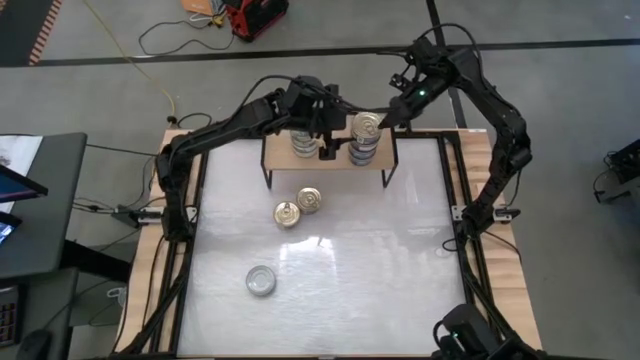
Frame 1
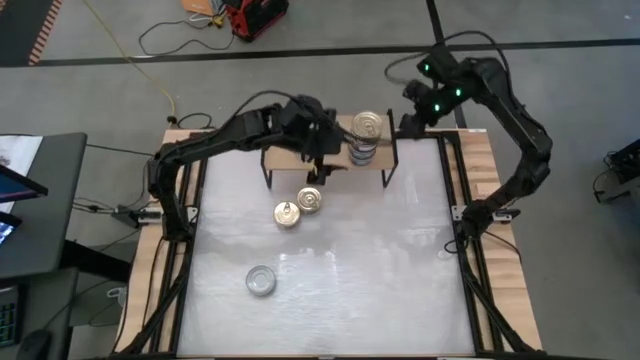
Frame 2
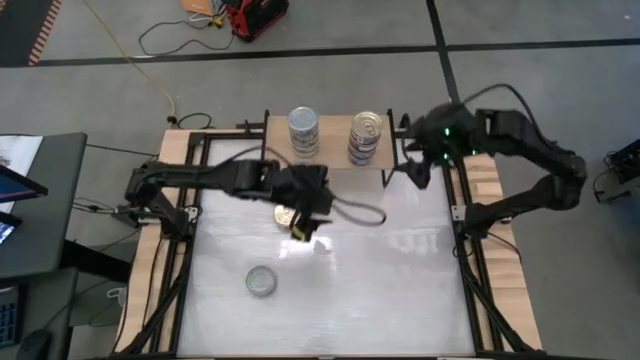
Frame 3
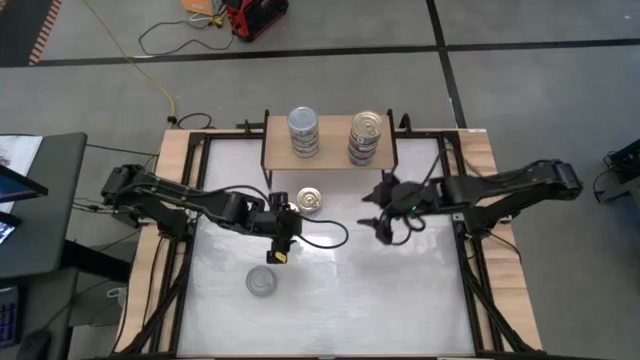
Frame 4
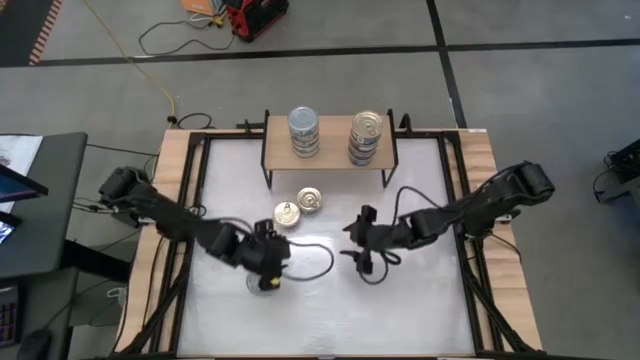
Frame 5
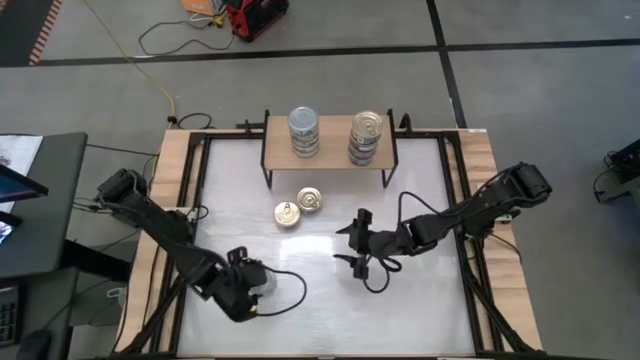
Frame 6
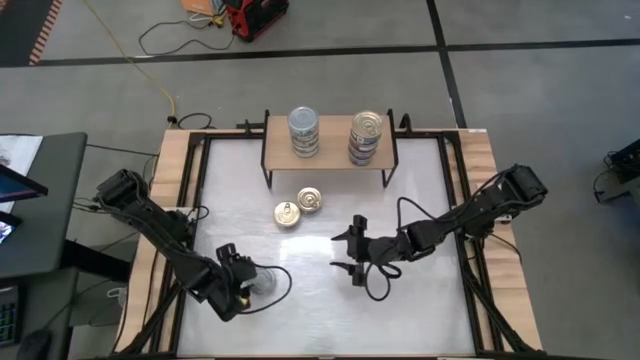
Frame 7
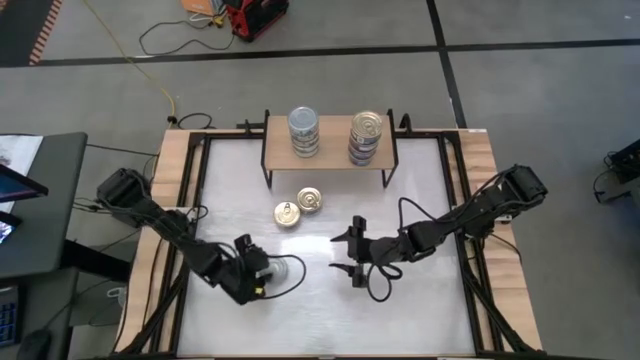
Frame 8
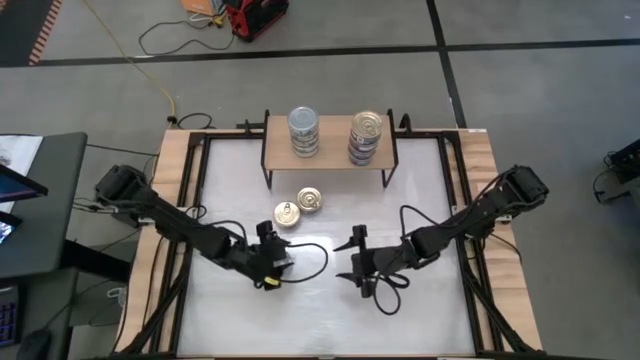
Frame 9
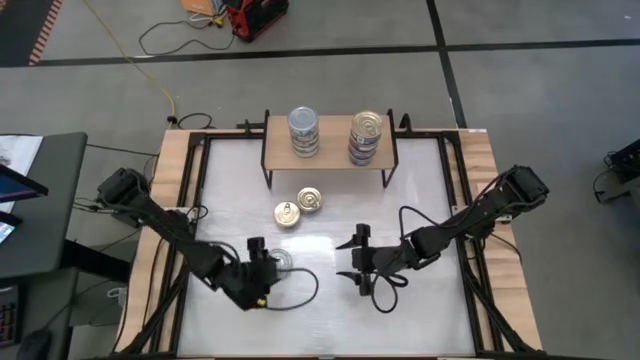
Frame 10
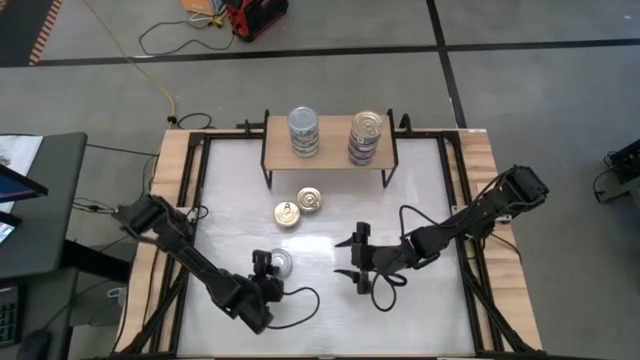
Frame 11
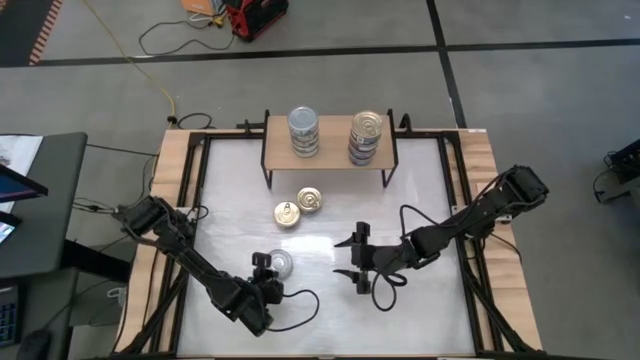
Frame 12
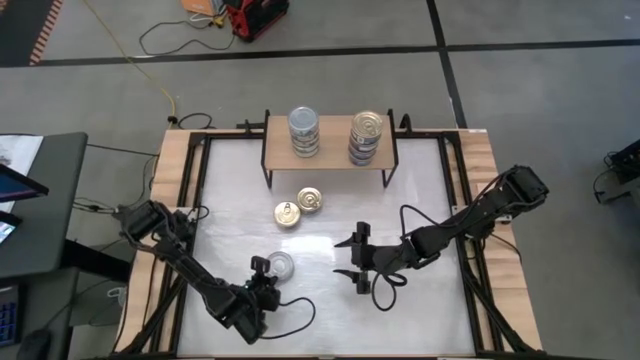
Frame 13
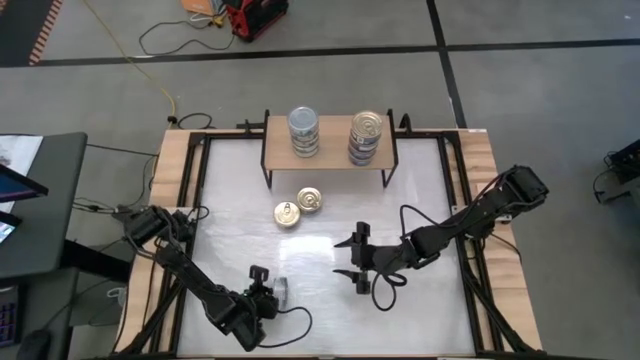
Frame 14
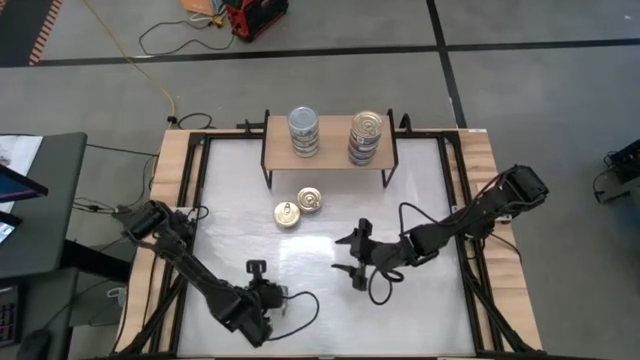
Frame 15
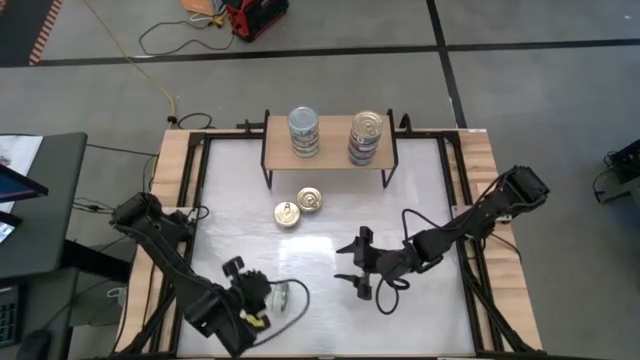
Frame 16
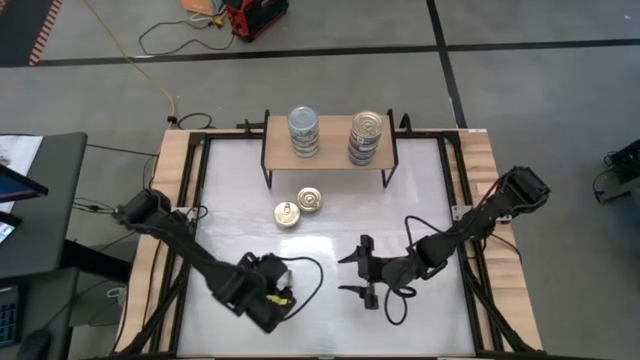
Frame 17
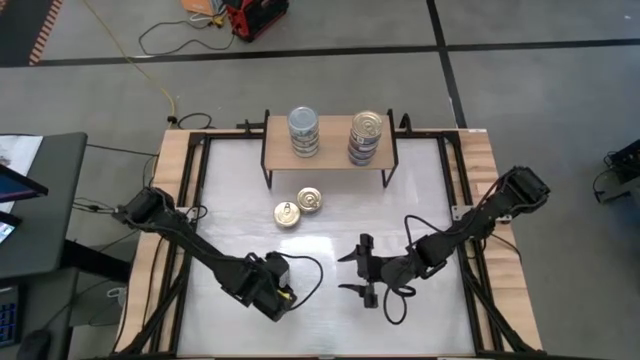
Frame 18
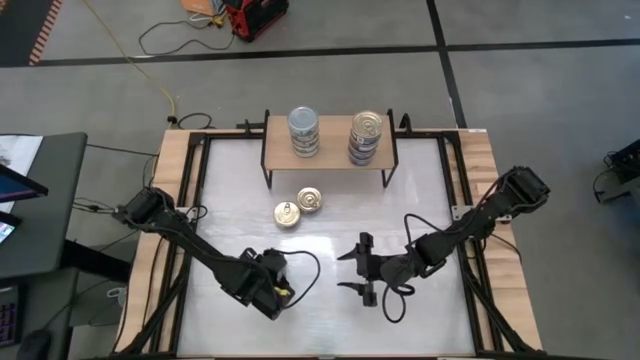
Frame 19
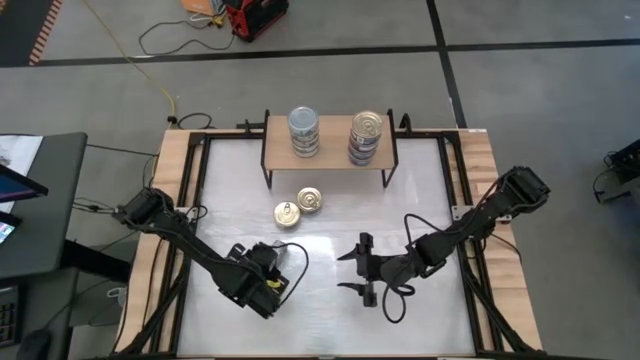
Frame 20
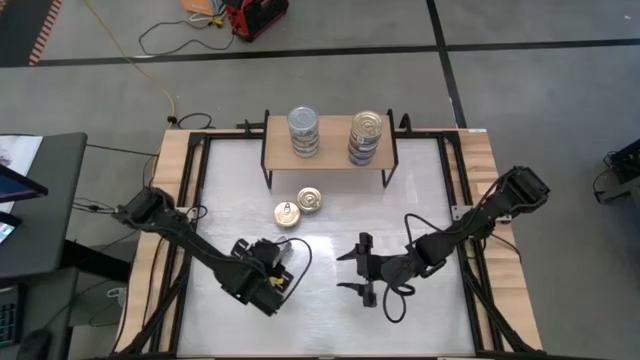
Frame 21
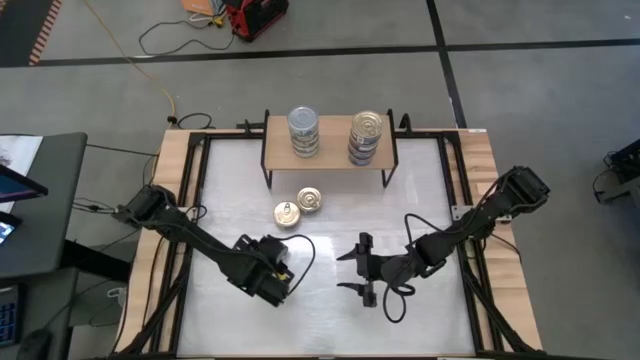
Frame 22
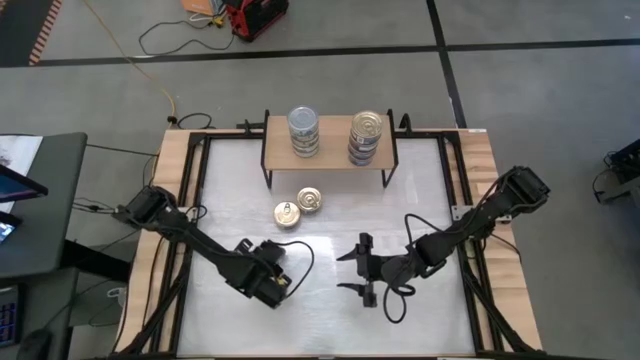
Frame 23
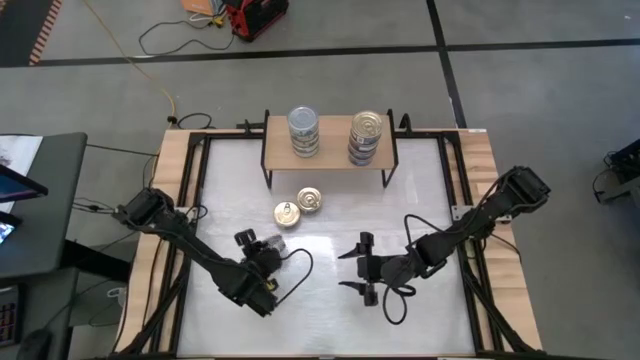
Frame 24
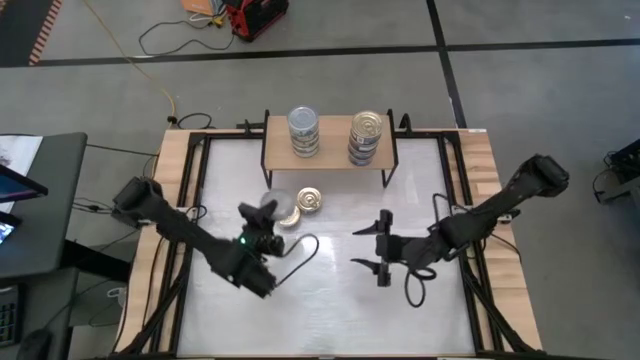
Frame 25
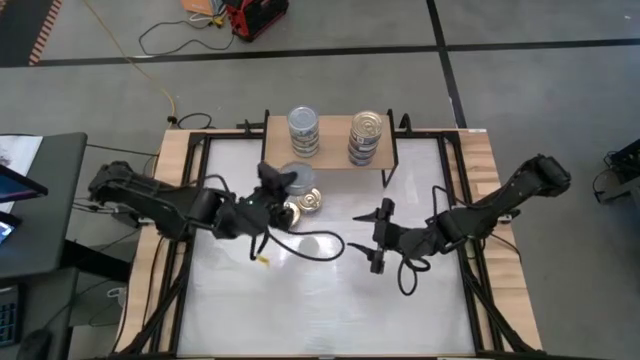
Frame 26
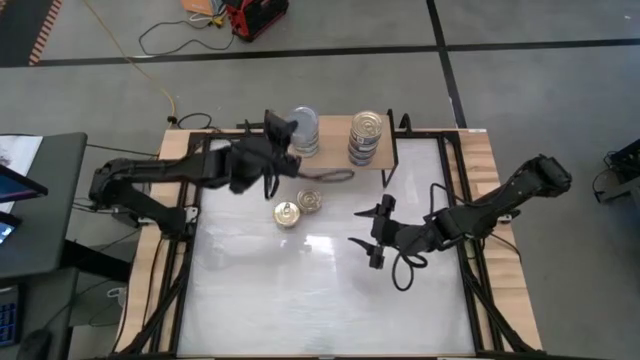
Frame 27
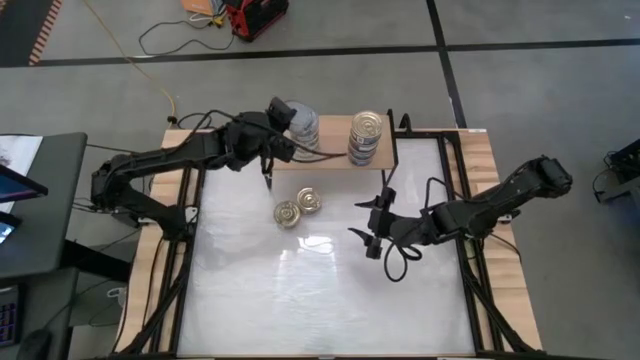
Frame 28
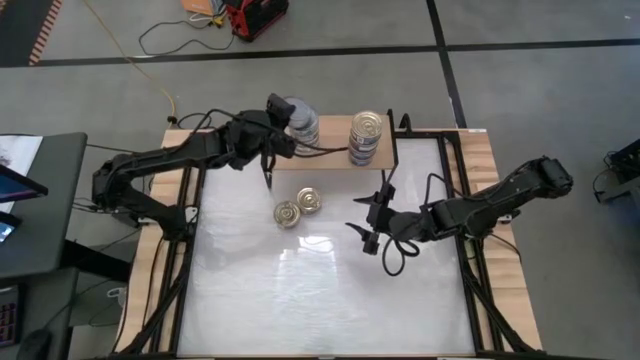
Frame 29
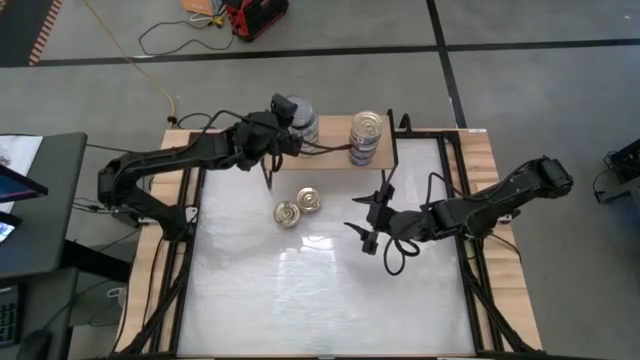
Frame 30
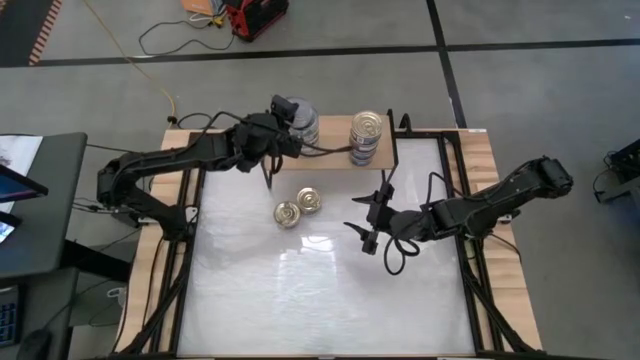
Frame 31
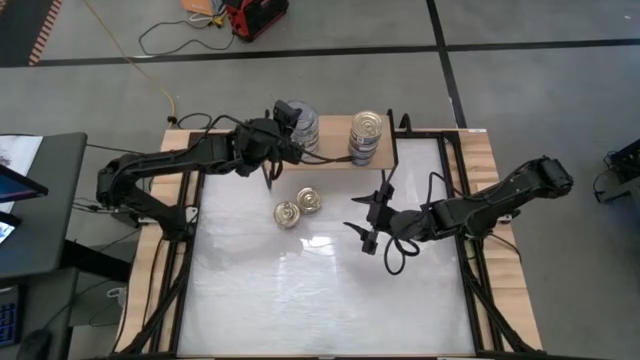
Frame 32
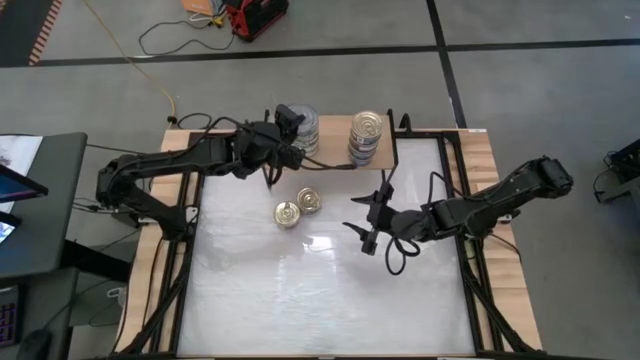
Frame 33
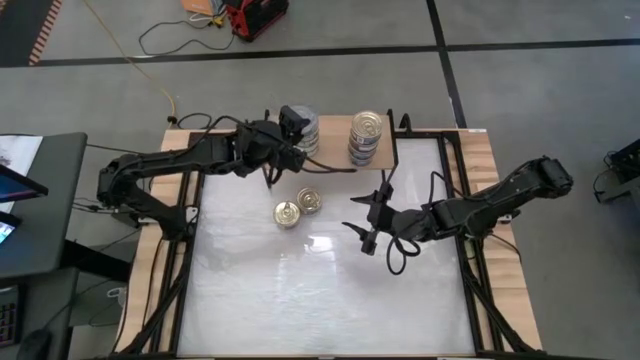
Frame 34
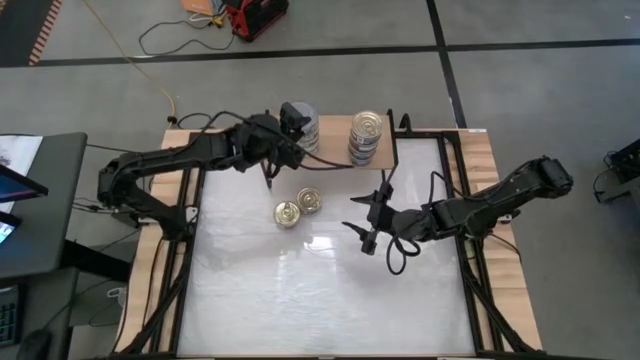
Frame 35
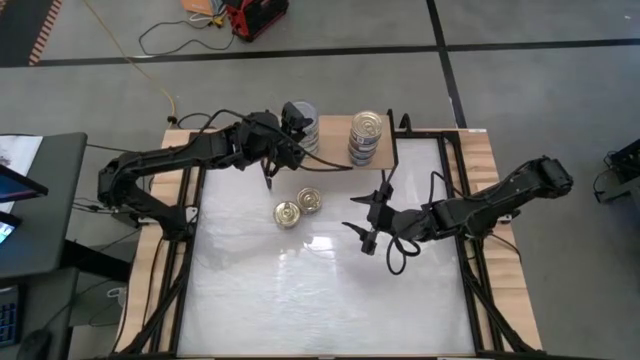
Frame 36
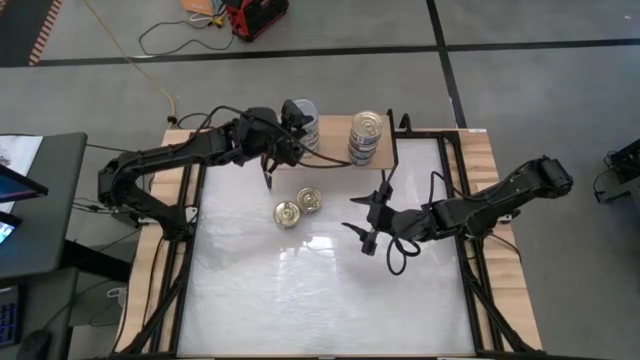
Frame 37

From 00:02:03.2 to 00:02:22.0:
Task: Stack canned seafood by type on shelf
Stack the green white tuna can on top of the other green white tuna cans on the shelf

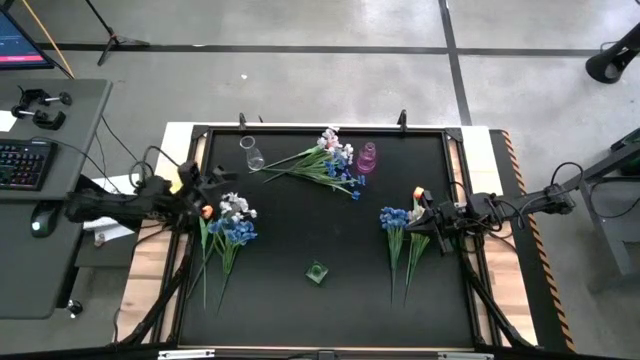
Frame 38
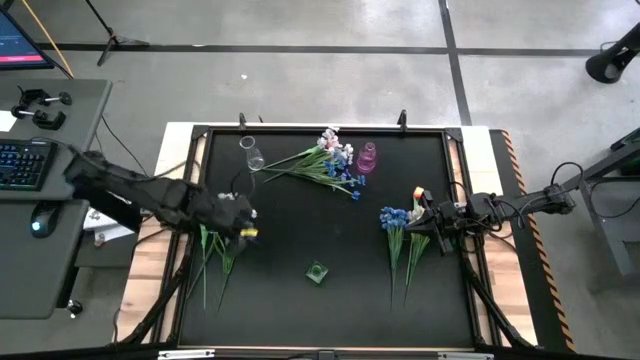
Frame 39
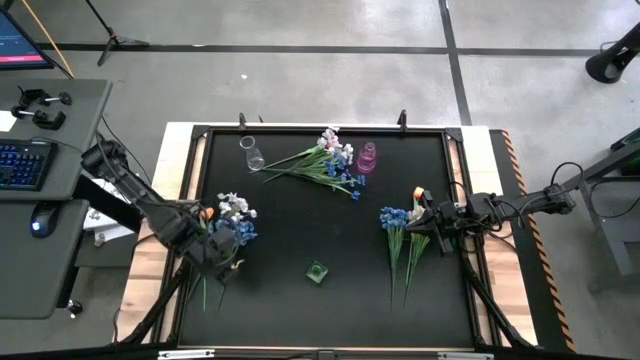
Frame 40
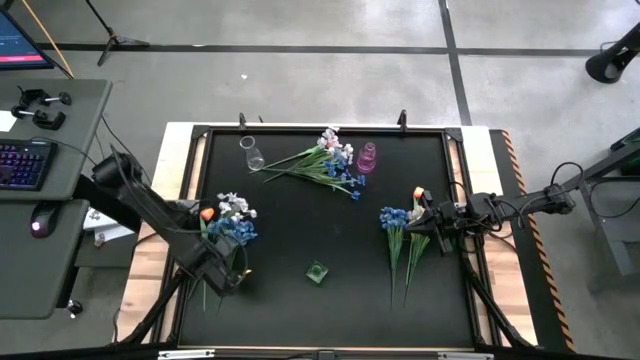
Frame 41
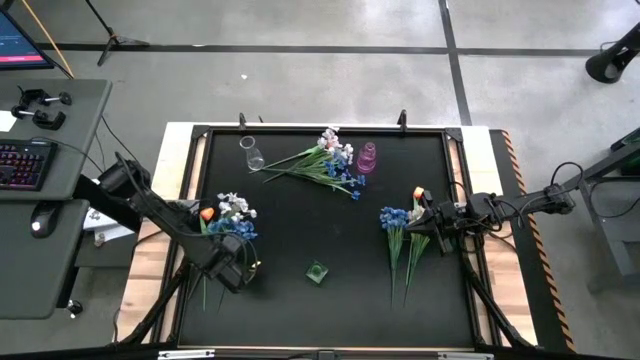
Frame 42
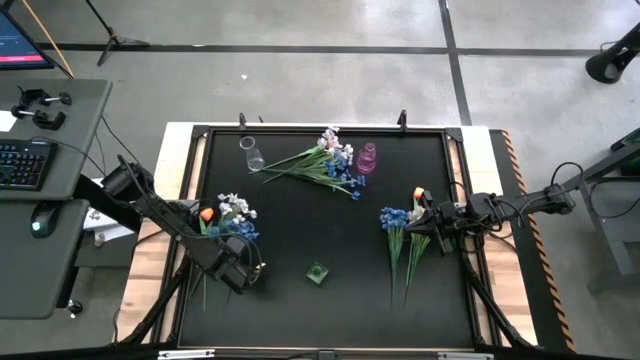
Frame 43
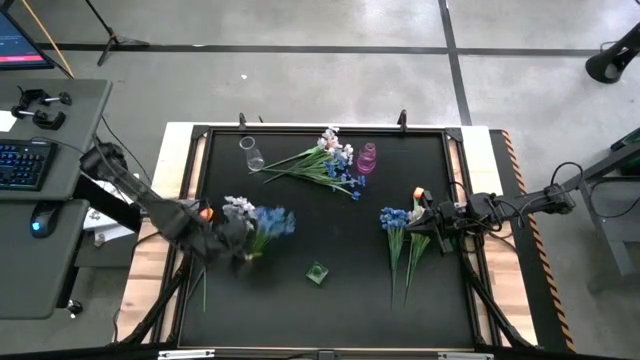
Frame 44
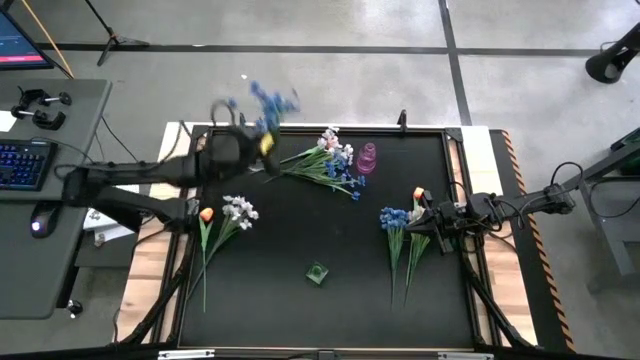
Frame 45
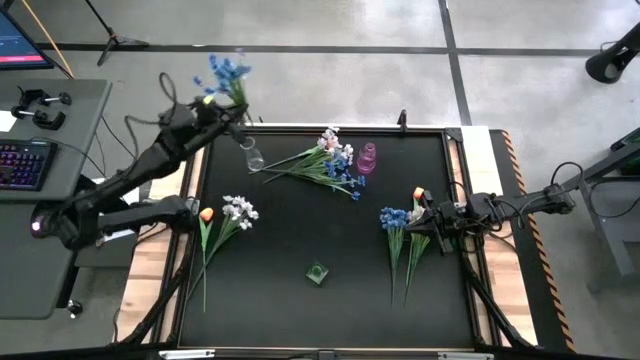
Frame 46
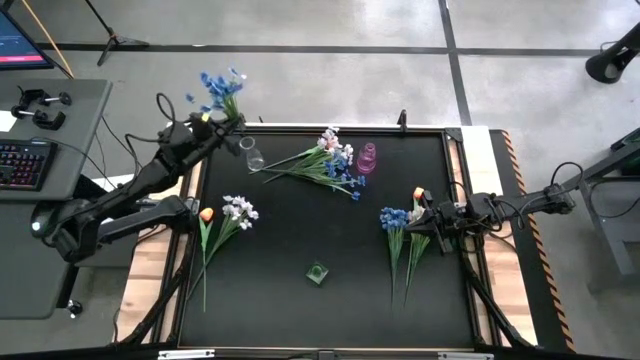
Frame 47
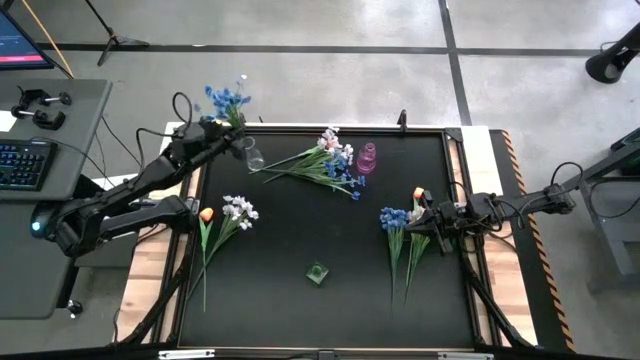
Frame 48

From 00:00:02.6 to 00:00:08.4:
Task: Sort flowers into vase by color
Put the bottom left blue flowers into the transparent vase
